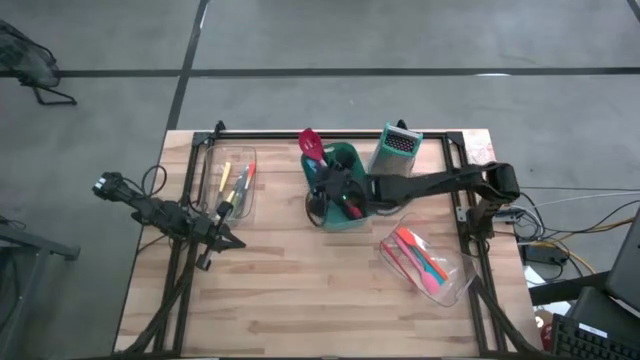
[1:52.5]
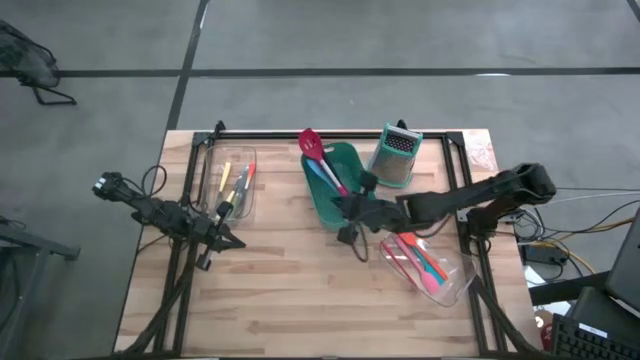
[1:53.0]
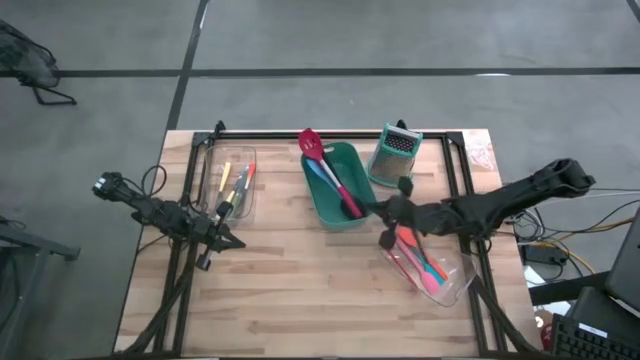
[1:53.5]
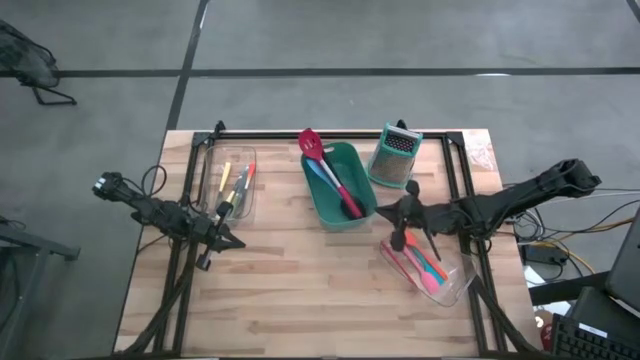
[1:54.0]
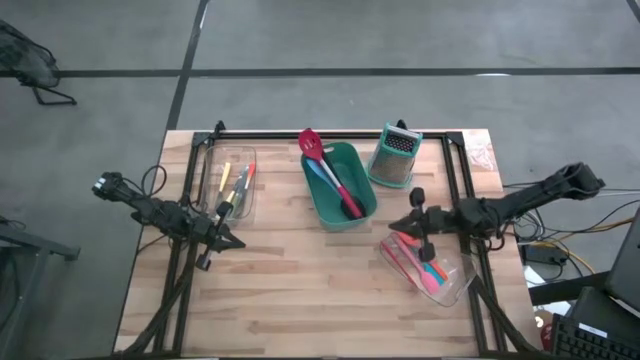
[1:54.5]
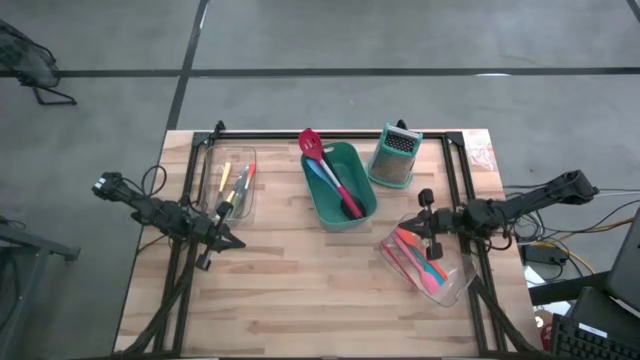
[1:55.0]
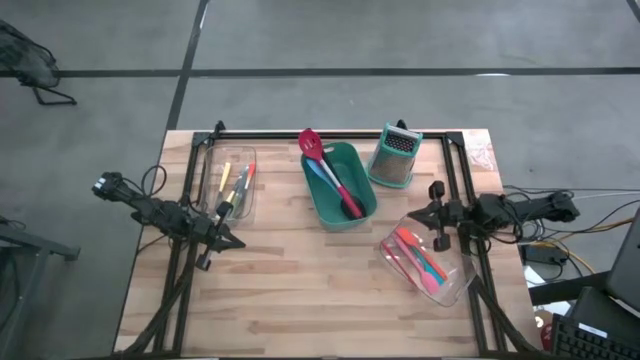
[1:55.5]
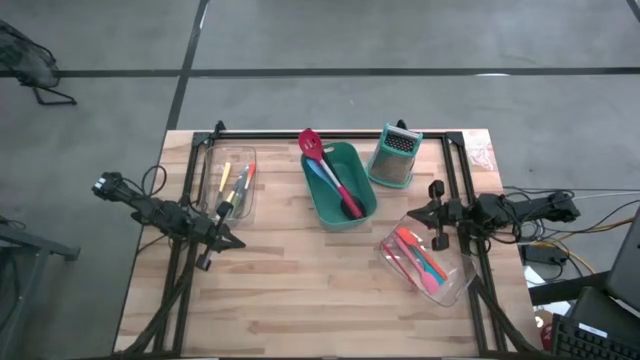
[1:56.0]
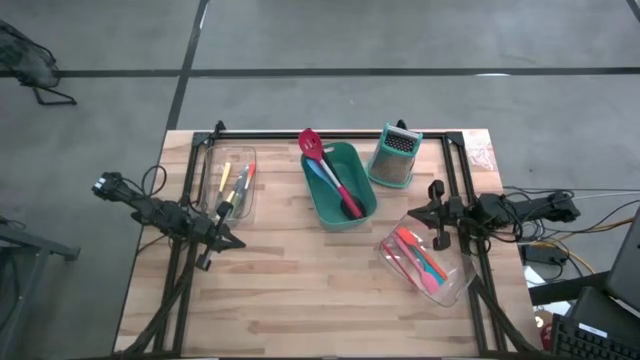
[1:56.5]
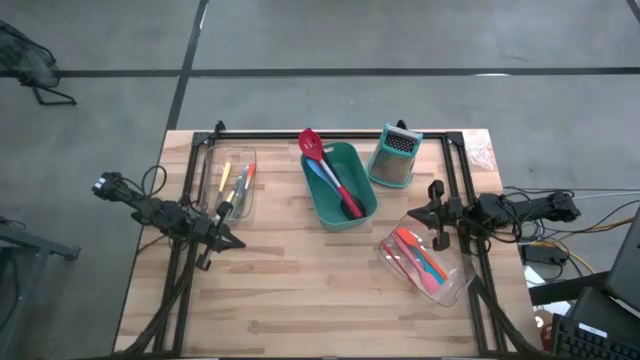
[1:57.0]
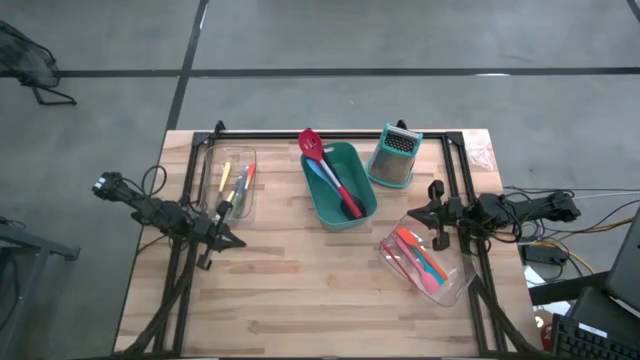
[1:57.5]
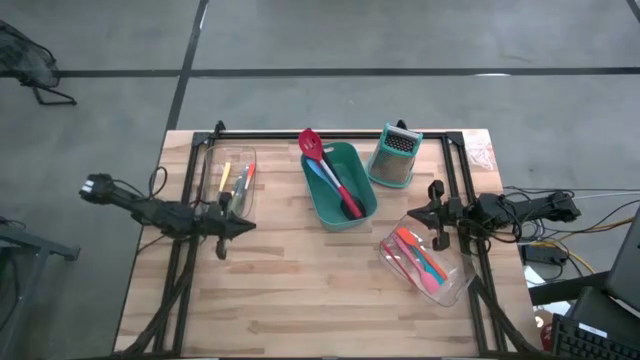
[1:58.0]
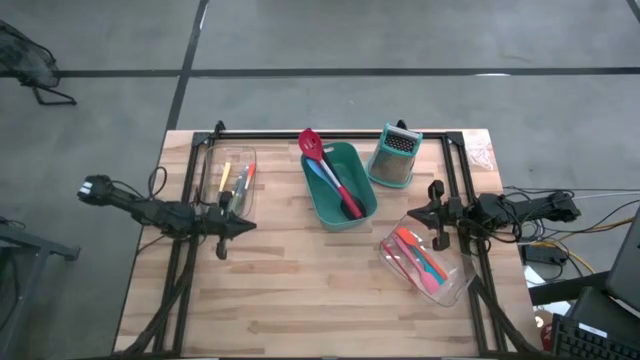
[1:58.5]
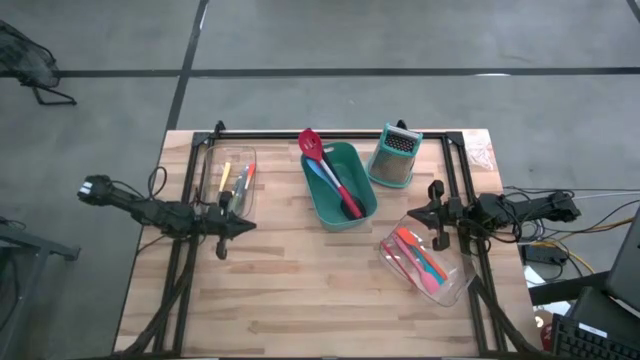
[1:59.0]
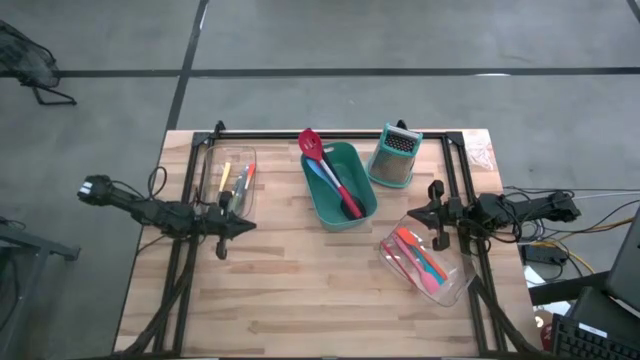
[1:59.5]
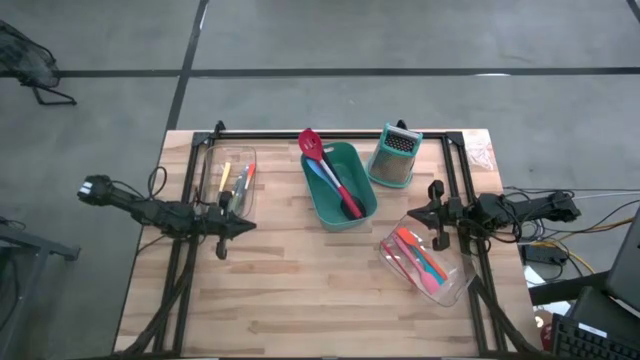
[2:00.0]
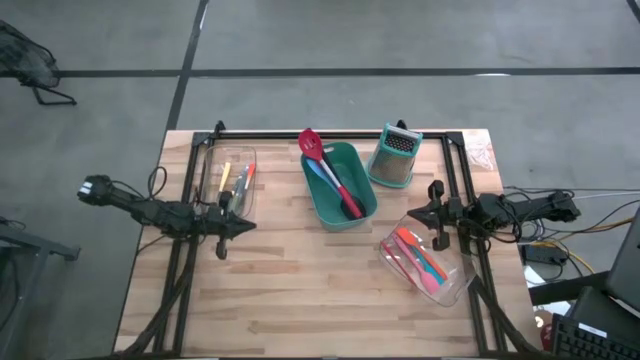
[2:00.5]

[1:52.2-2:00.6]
Task: Pick & Place Kitchen Items
Return to Home Position

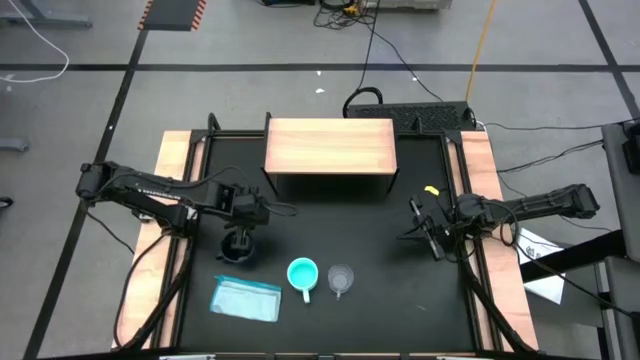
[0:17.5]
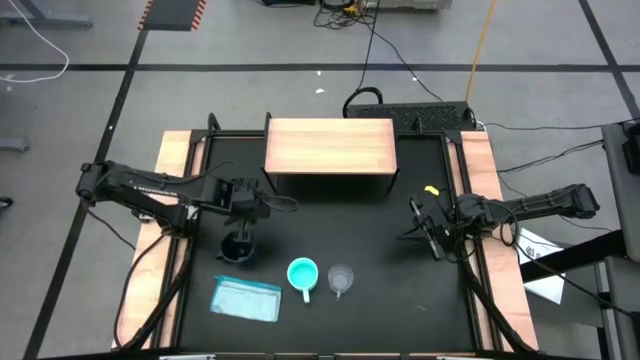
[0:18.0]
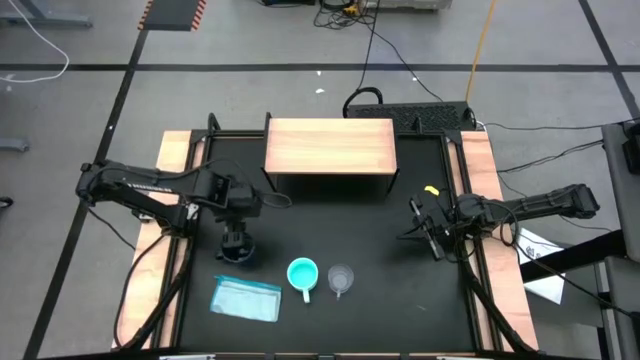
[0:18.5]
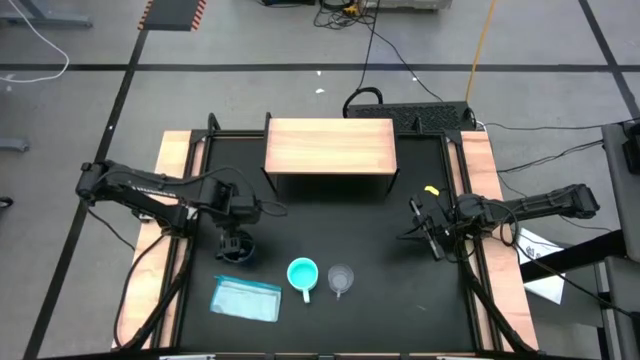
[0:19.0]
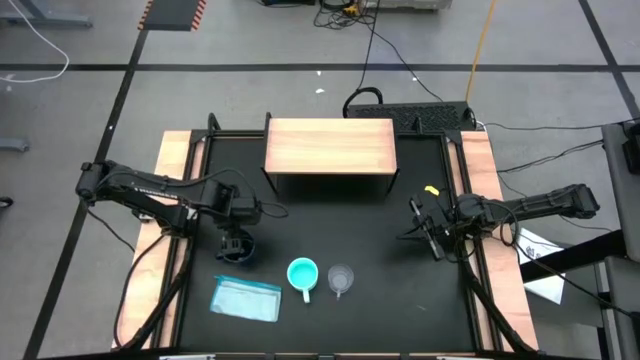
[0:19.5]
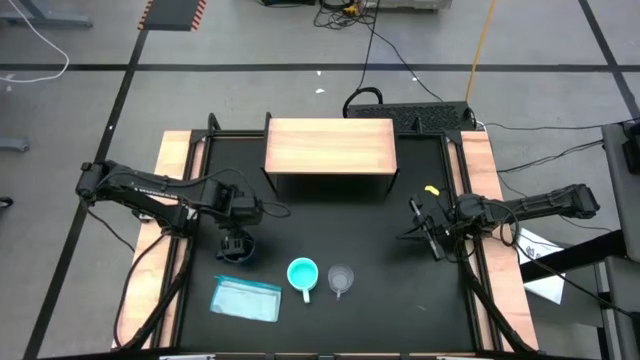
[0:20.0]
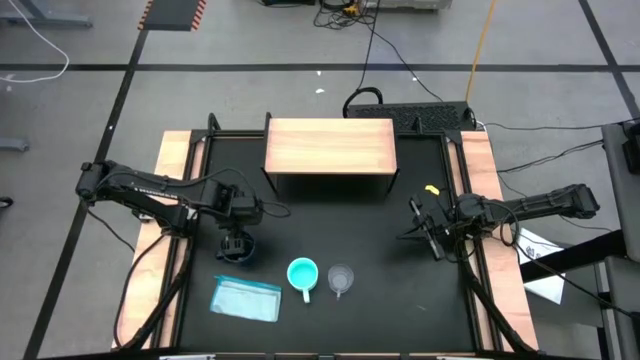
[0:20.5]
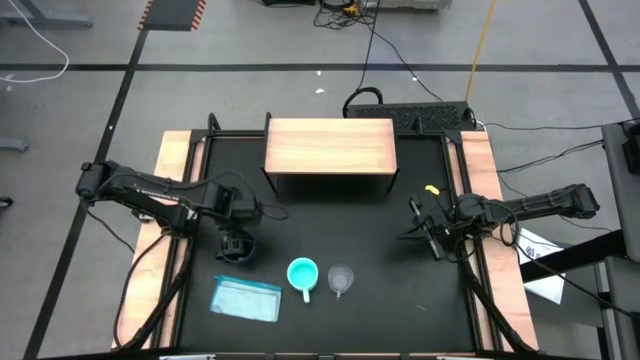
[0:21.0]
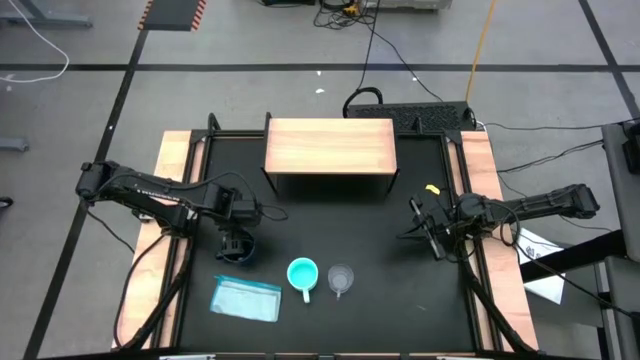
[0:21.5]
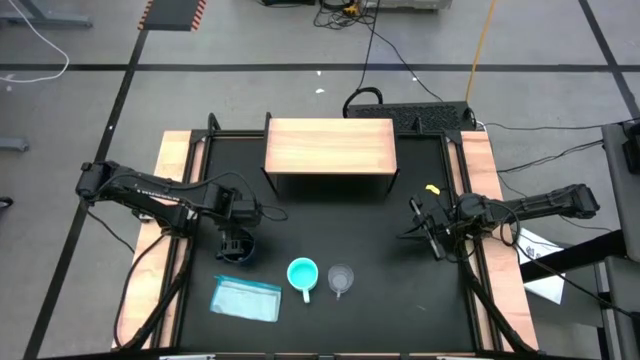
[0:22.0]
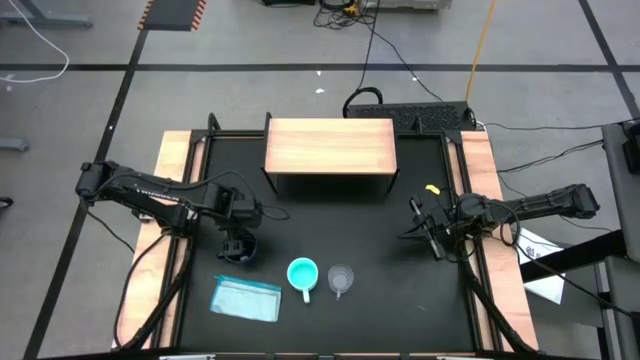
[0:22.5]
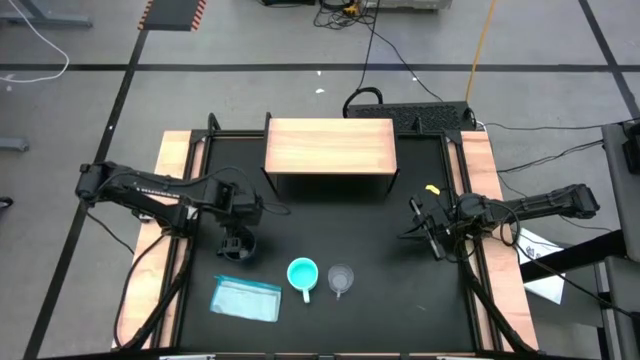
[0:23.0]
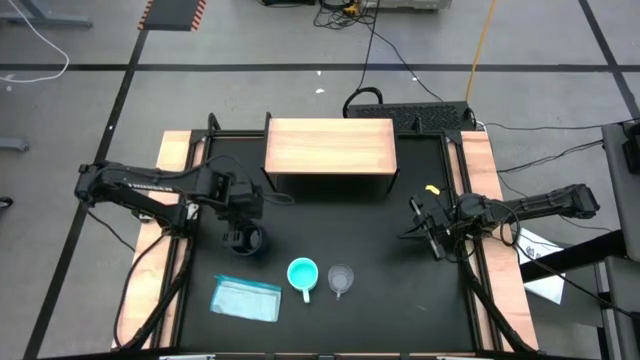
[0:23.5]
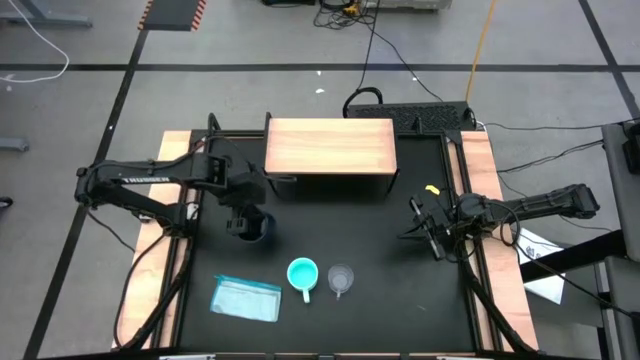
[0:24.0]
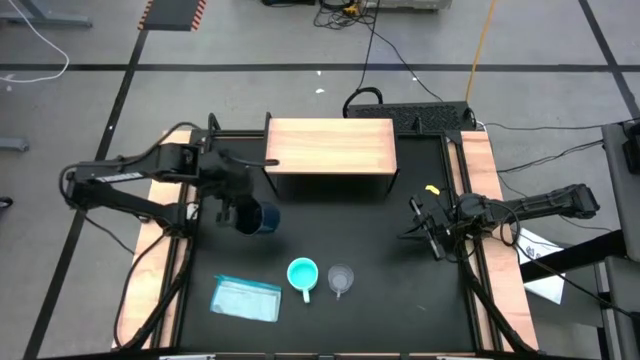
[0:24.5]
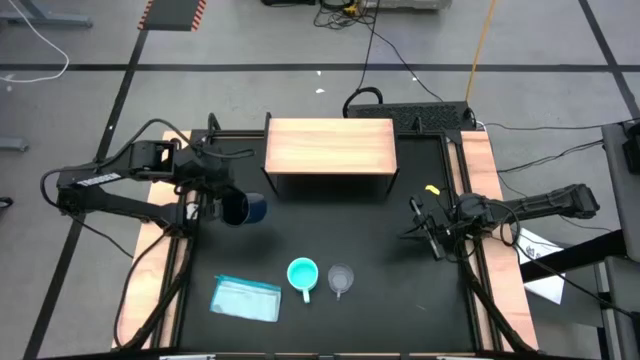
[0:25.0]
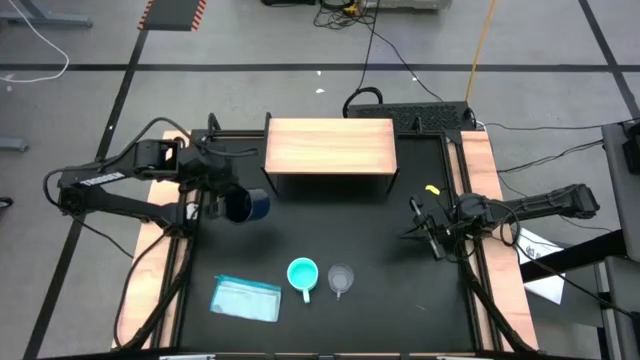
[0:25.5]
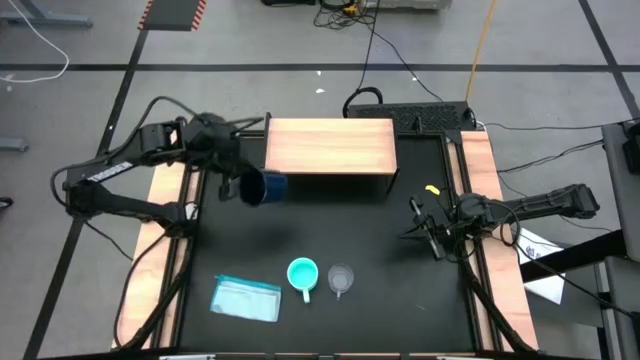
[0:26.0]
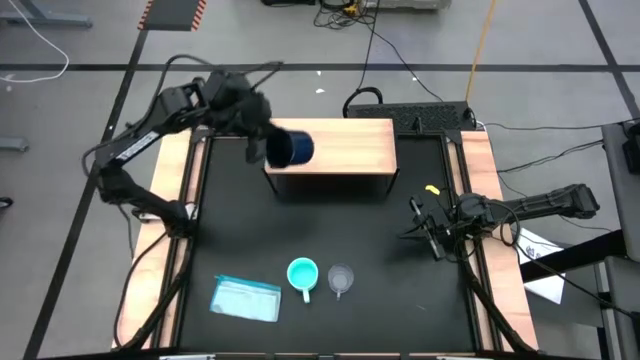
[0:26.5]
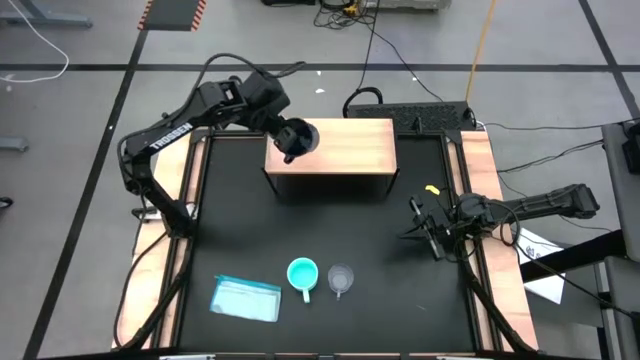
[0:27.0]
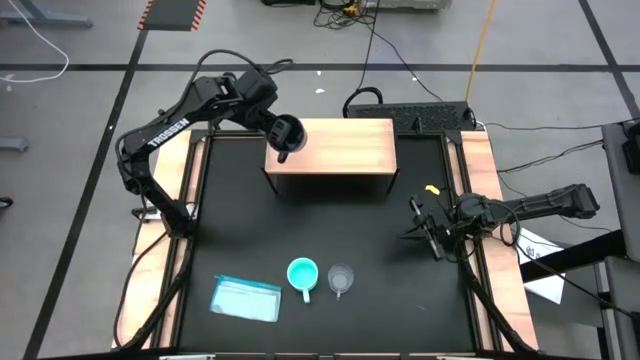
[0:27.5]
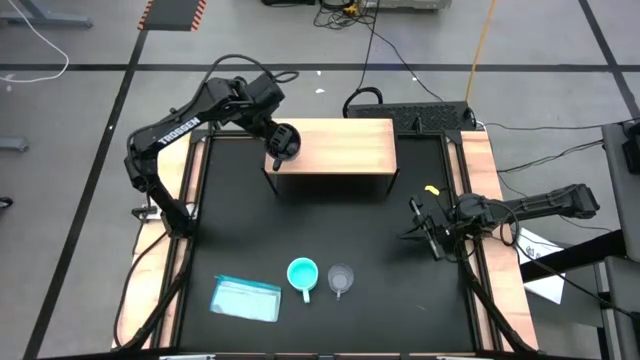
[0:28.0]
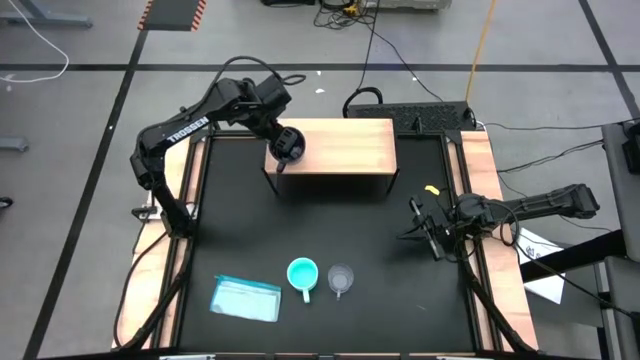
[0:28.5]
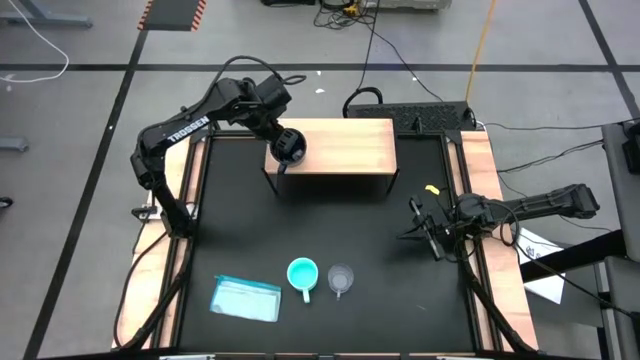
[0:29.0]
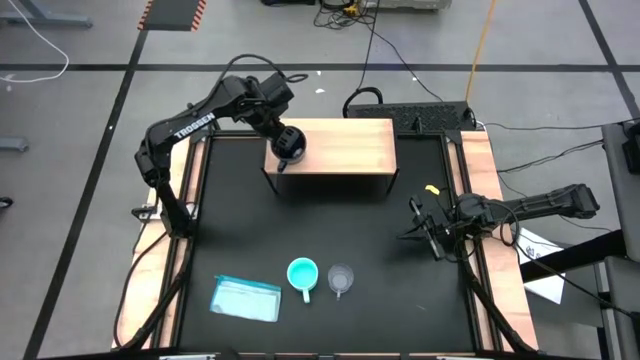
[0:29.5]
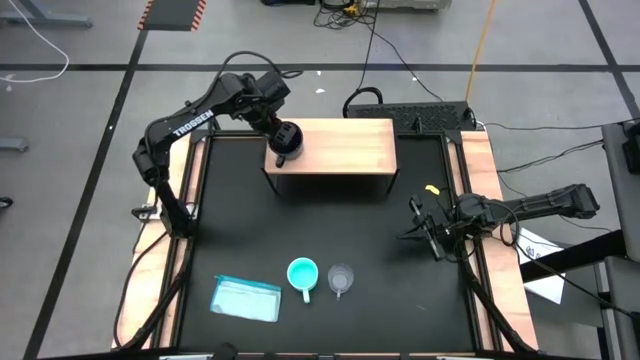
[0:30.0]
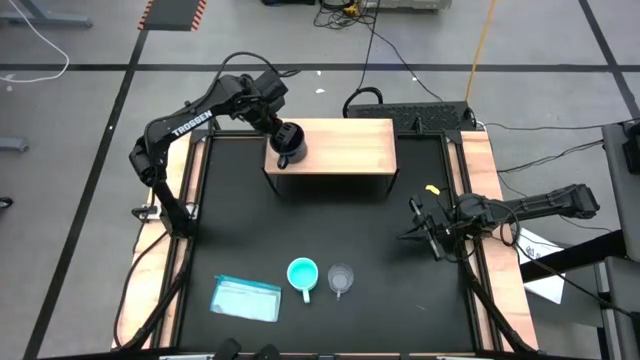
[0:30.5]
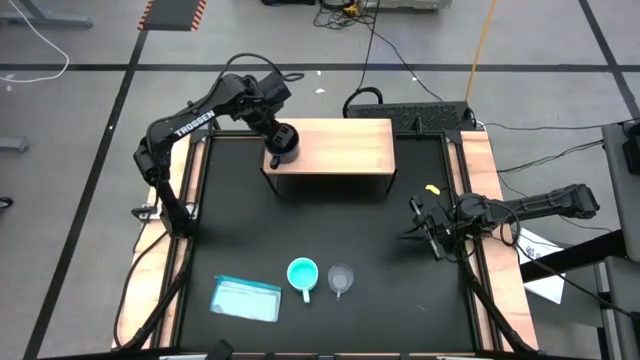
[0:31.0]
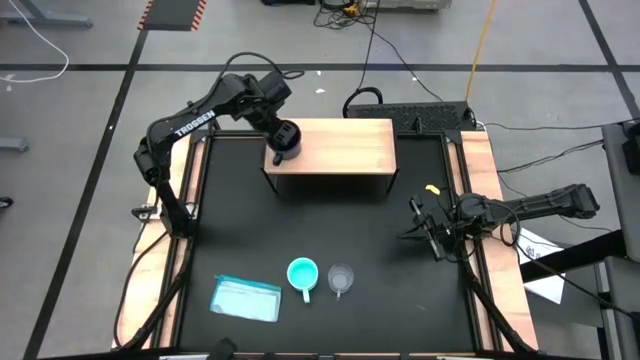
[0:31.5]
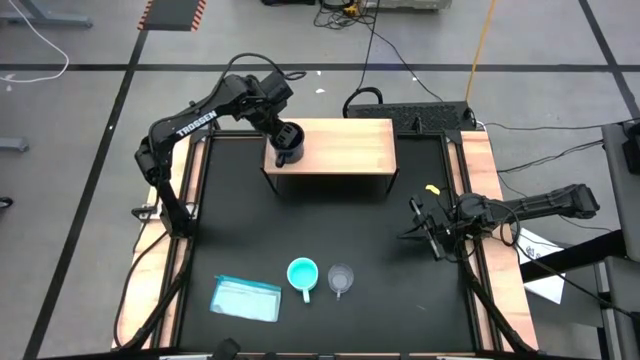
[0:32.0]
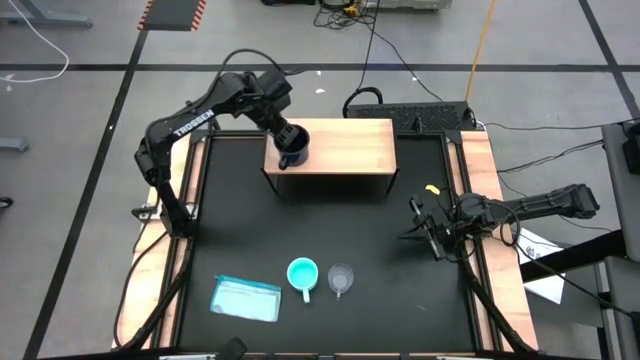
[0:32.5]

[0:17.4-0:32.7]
Task: Stack small to large cups/mugs on shelf
Put the dark blue mug on the shelf
